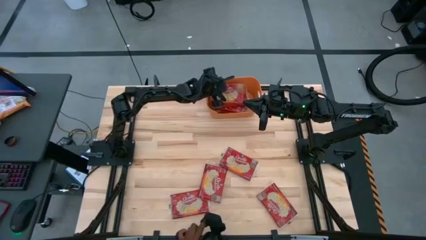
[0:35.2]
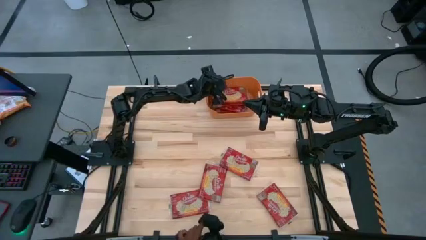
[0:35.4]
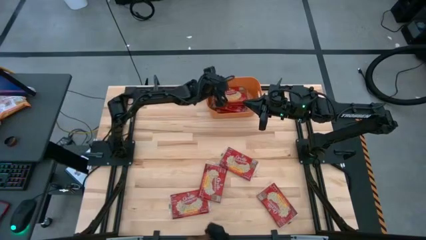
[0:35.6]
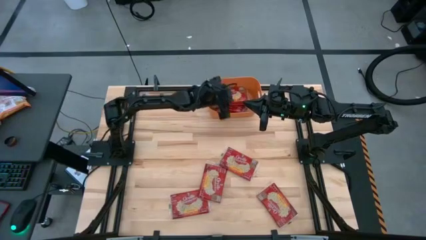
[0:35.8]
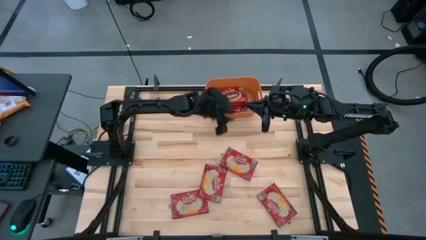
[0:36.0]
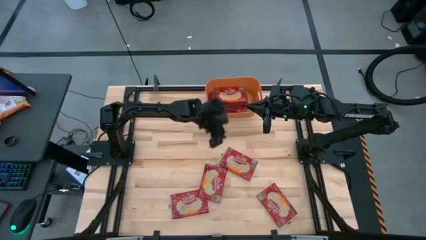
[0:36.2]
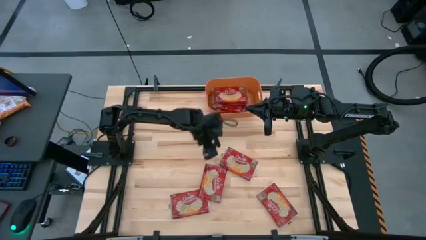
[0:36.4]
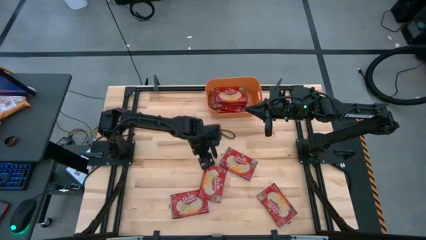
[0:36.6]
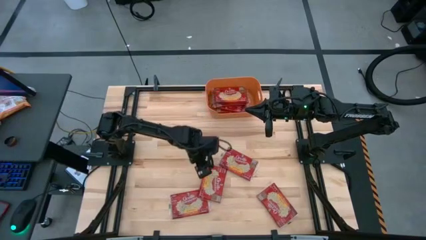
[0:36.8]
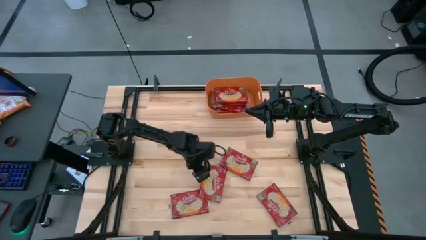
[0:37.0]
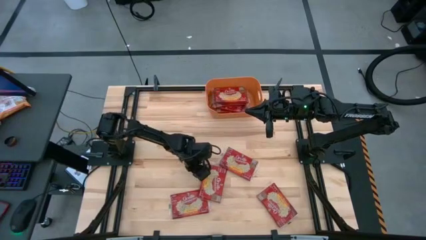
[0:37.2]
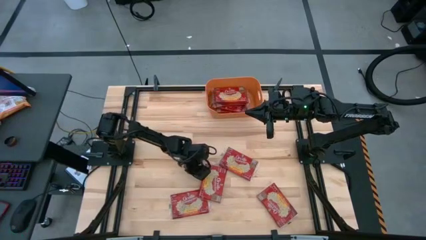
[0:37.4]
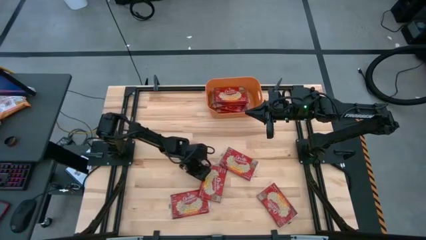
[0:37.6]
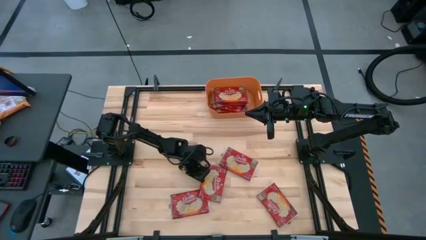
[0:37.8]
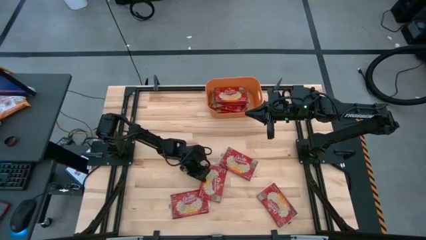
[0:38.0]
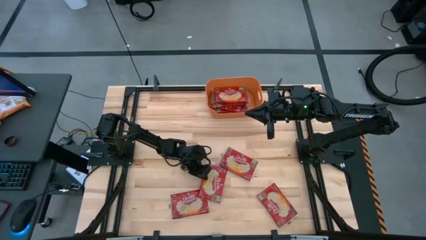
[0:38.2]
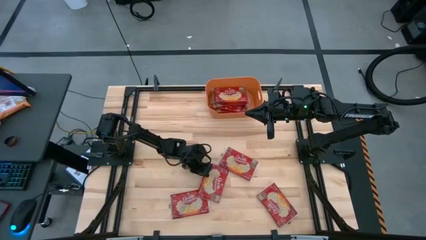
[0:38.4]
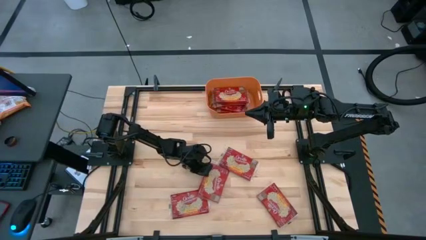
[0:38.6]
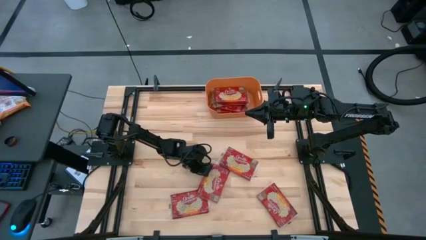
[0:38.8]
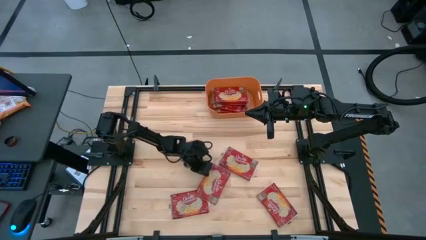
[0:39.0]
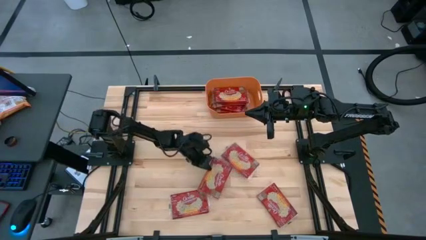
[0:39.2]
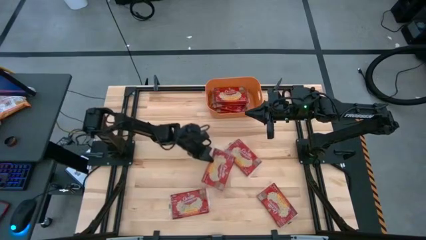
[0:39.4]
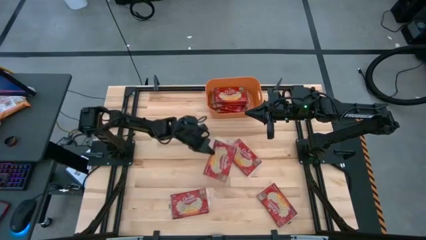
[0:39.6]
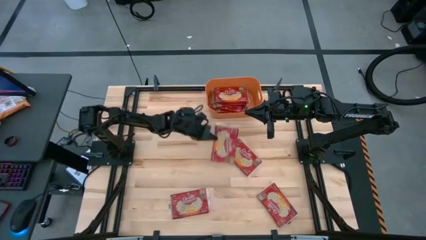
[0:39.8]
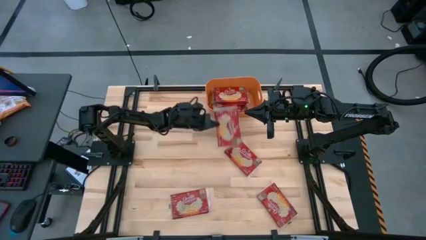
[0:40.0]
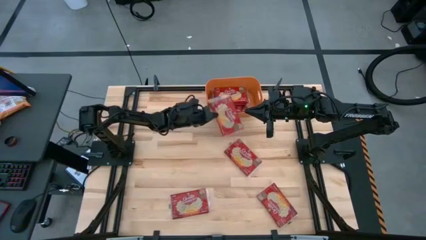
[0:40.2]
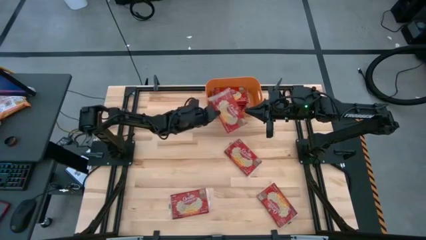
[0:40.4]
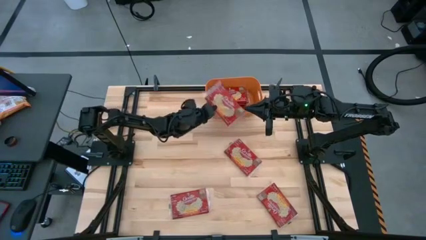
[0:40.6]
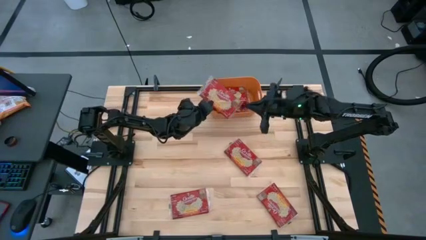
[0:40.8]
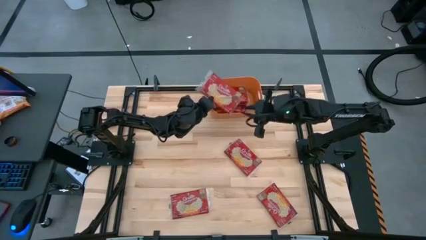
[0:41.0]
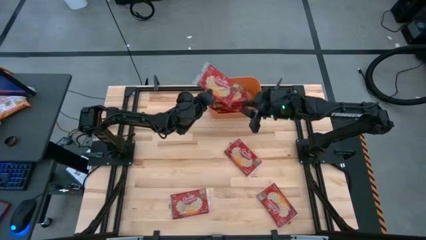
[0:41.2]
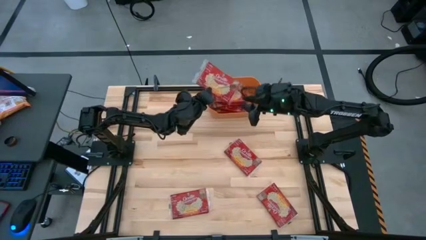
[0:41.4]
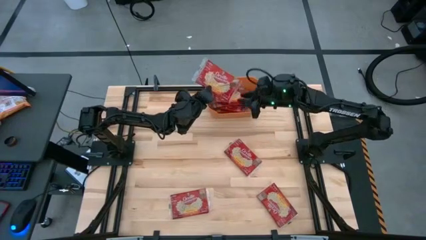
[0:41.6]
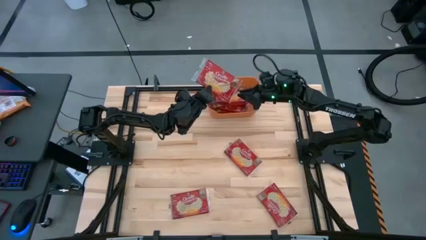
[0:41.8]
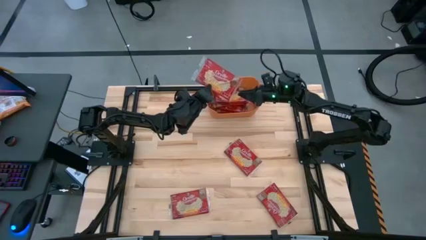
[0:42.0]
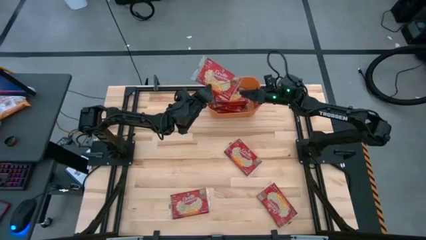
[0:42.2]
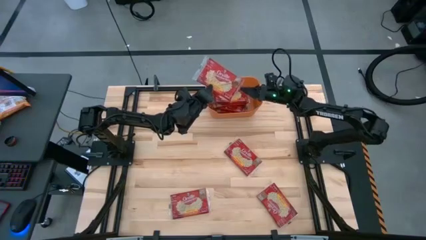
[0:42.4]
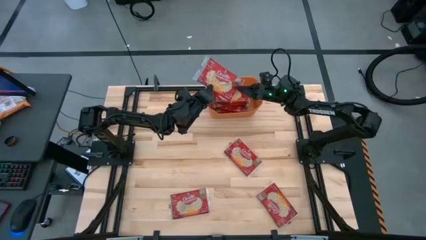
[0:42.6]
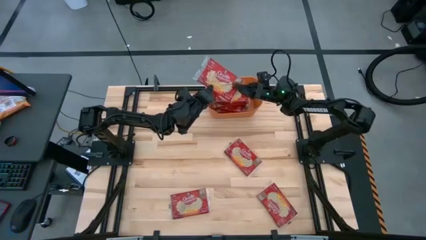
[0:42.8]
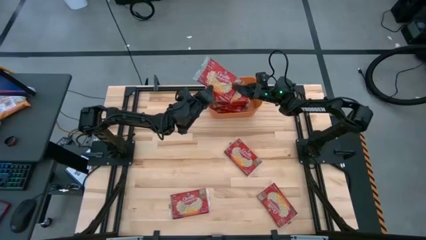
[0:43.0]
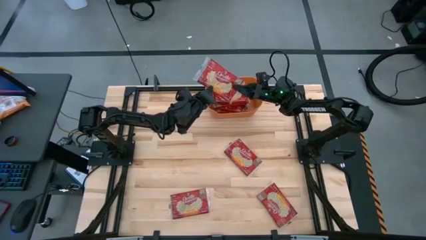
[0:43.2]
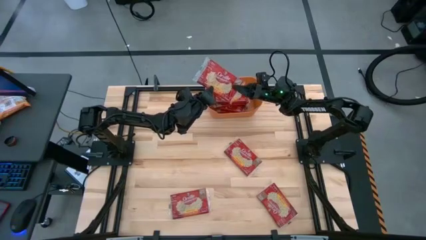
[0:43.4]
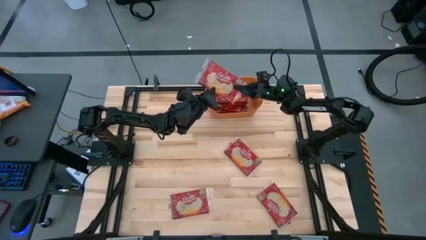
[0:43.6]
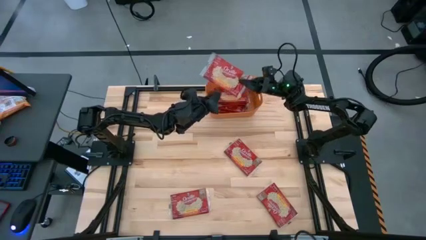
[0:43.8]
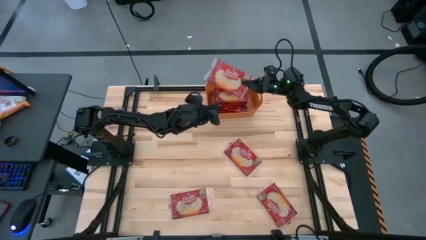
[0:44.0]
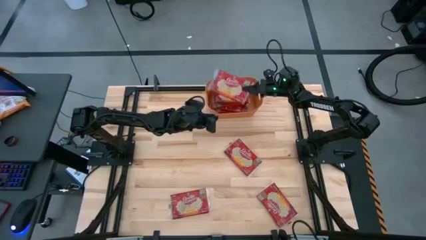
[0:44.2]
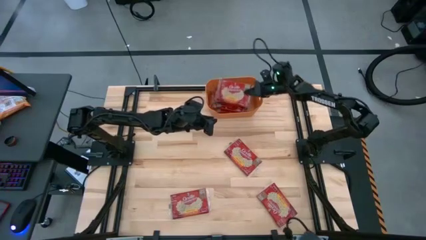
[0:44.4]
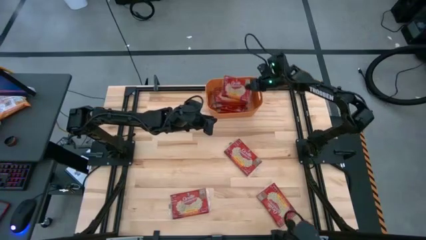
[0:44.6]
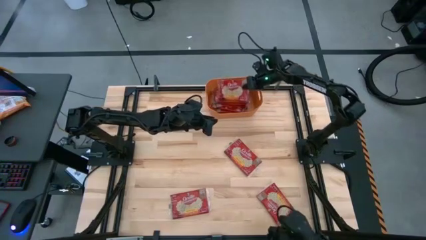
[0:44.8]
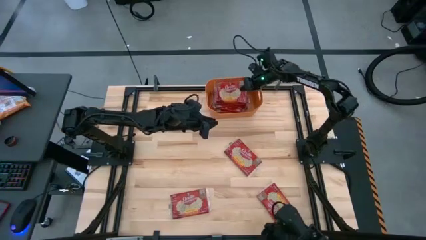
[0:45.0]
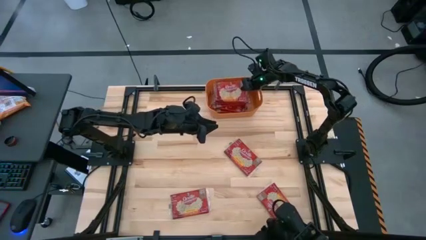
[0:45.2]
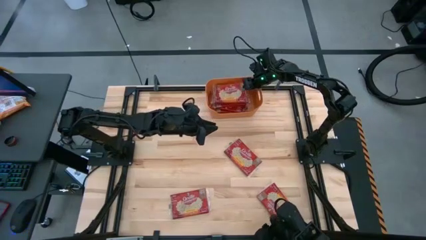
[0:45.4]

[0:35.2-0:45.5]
Task: Sort popcorn bags into baskets
Put the popcorn pack into the orange bin

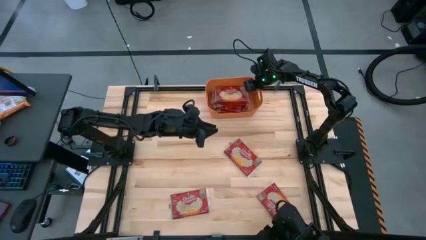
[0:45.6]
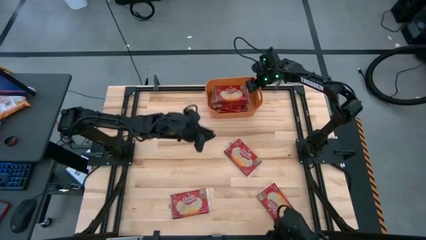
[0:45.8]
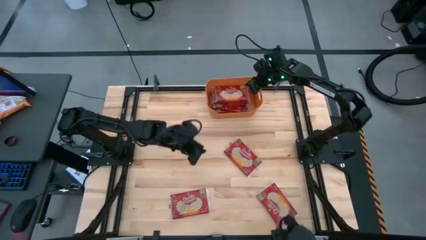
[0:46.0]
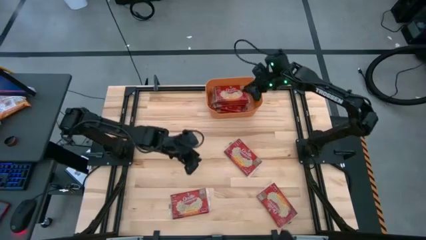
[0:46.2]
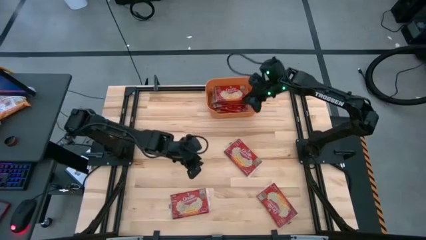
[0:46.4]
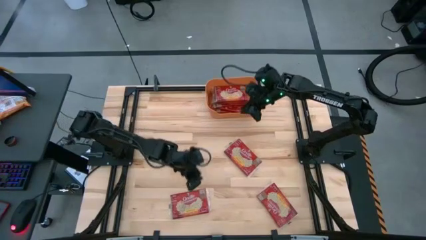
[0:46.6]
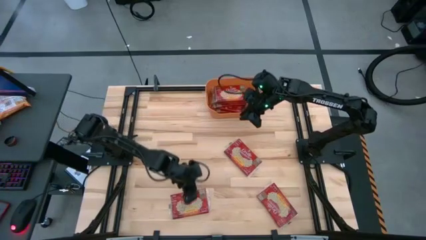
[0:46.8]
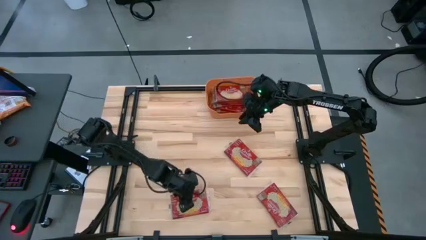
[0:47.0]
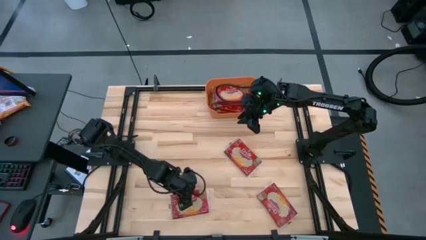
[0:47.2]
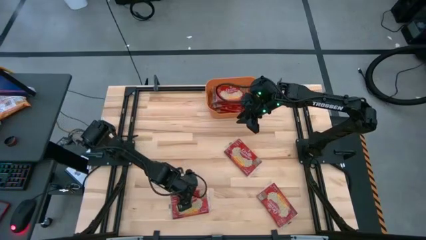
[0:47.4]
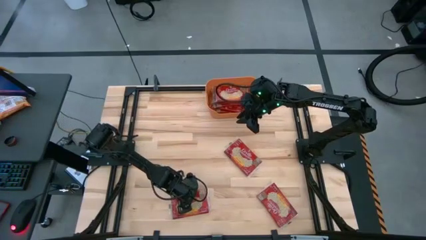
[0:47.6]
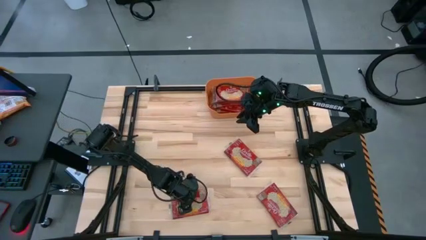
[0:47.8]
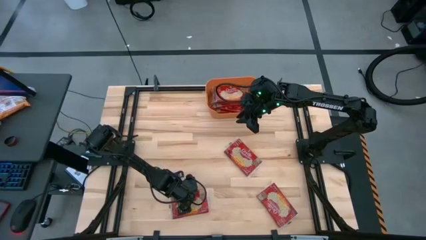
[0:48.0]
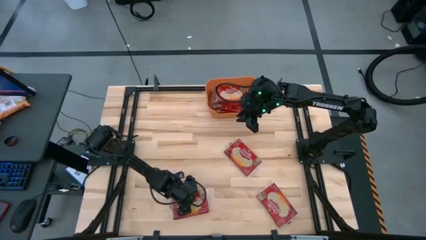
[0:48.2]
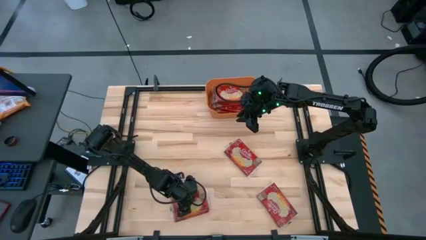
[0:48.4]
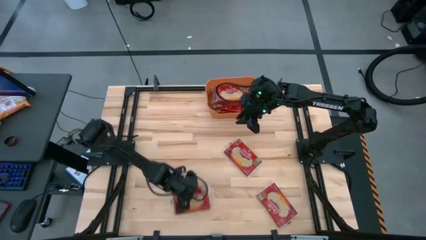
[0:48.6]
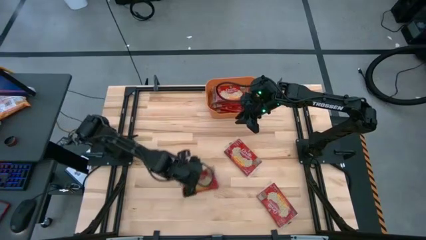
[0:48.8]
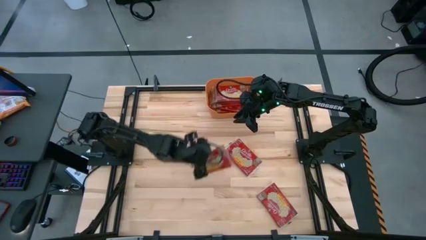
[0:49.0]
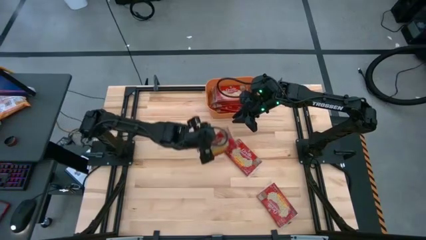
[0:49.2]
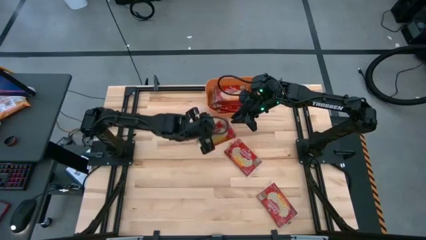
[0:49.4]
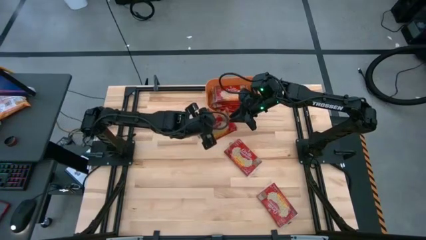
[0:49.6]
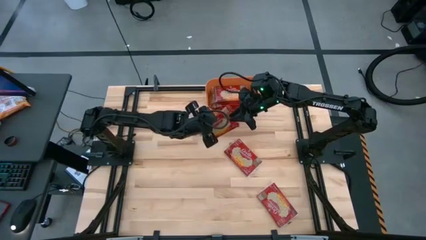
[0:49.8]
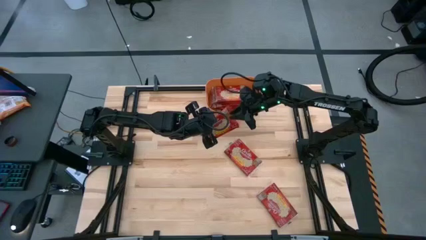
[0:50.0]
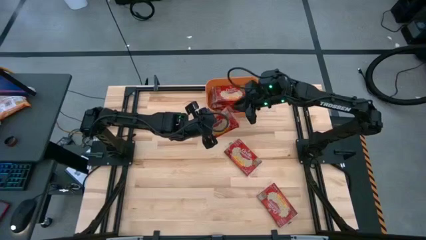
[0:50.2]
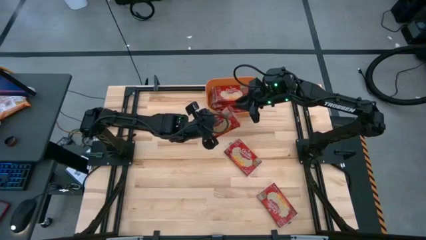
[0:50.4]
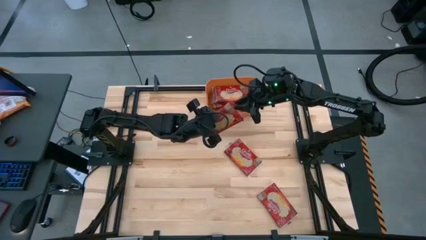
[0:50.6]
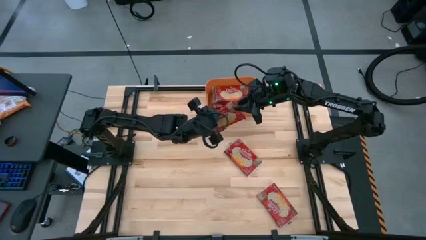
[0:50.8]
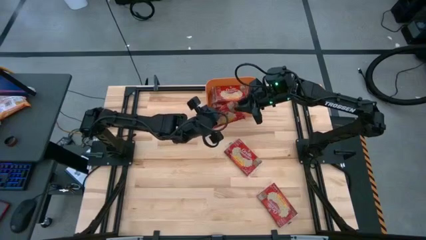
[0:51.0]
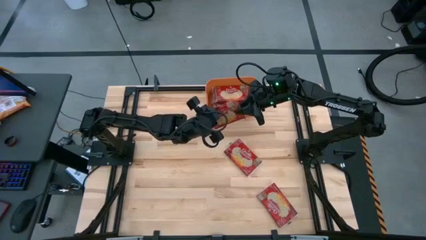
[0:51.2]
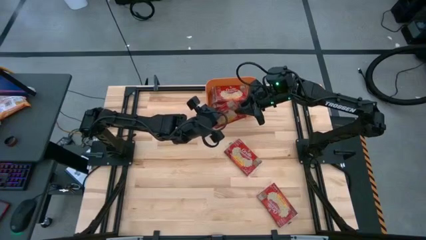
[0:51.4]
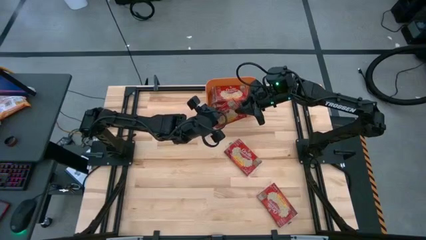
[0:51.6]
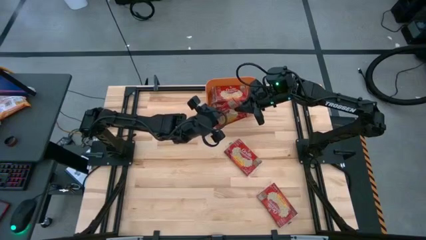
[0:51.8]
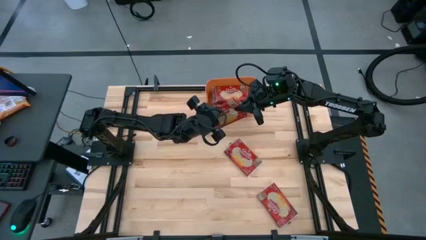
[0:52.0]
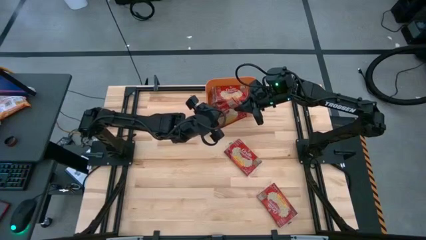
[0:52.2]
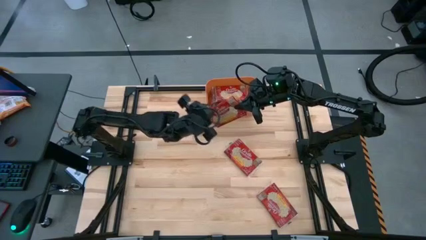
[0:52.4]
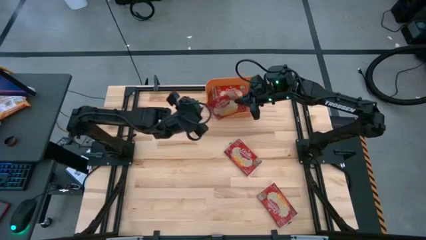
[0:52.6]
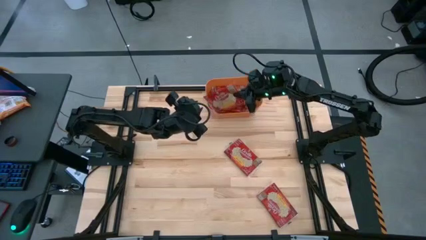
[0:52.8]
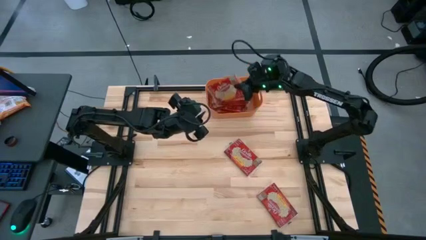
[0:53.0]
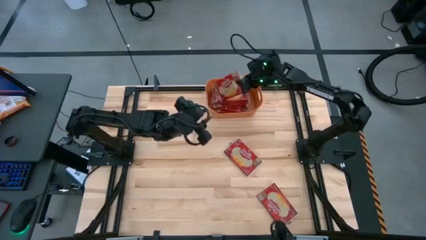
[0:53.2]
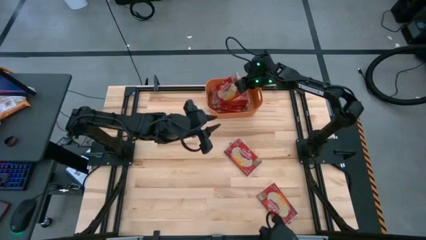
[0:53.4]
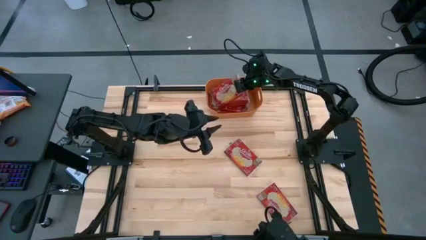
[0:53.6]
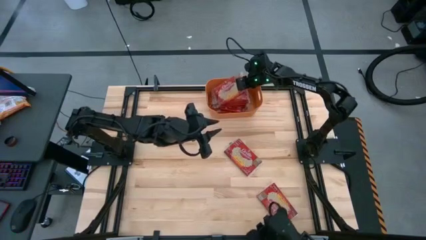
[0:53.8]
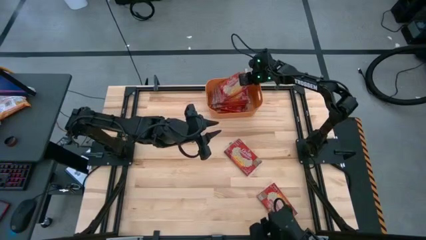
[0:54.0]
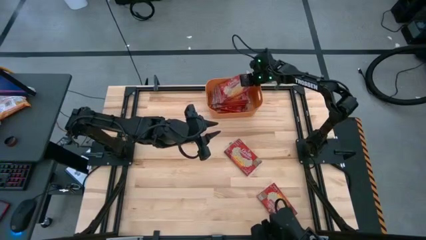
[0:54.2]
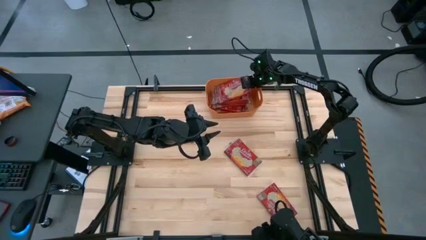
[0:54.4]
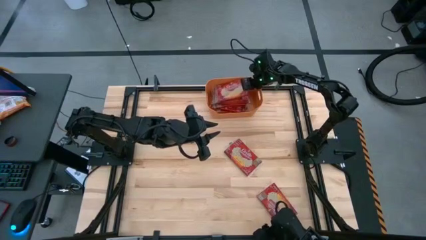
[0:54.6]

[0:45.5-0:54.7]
Put the popcorn pack into the orange bin
